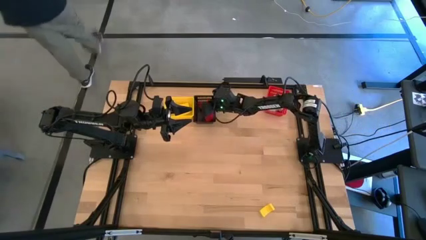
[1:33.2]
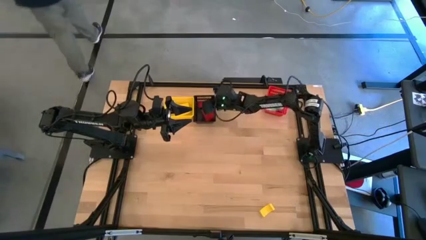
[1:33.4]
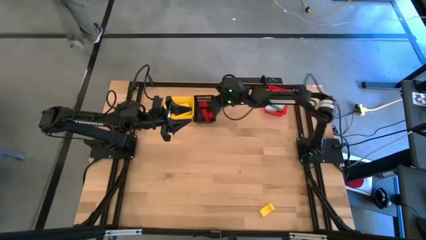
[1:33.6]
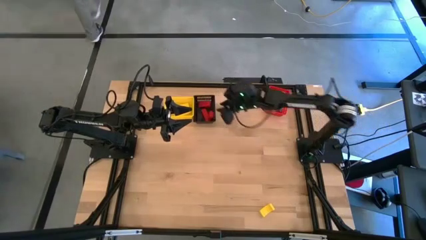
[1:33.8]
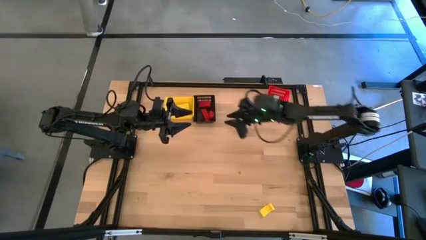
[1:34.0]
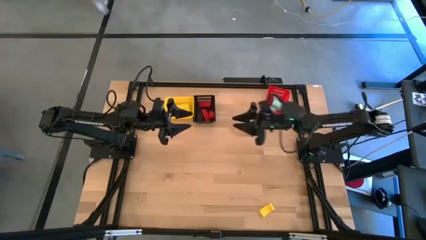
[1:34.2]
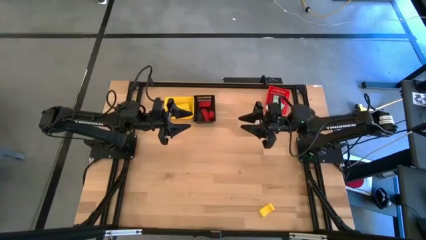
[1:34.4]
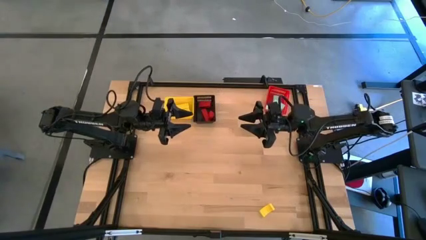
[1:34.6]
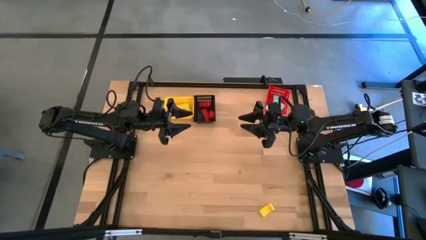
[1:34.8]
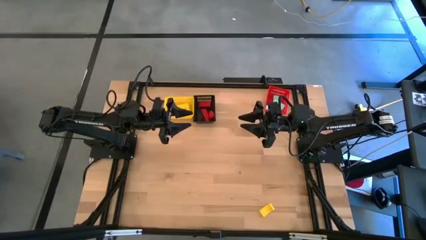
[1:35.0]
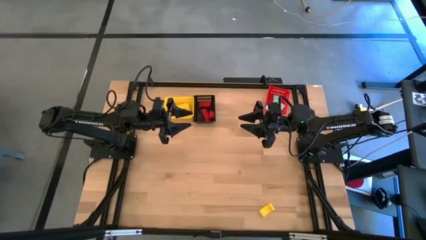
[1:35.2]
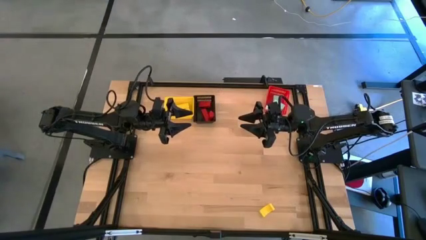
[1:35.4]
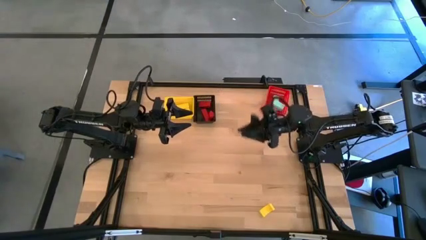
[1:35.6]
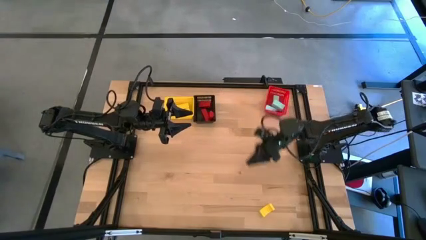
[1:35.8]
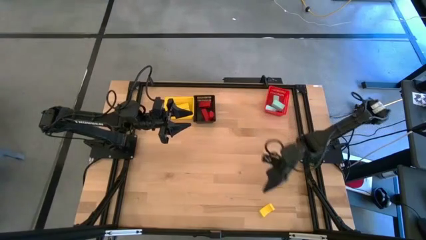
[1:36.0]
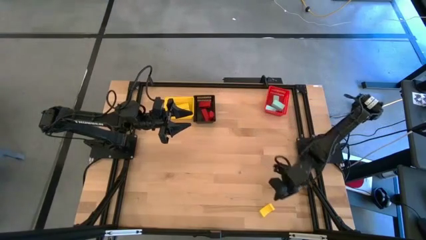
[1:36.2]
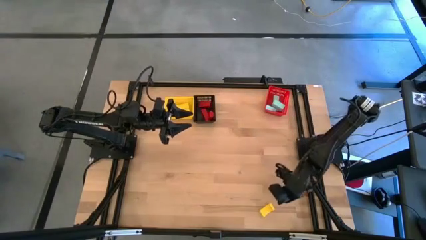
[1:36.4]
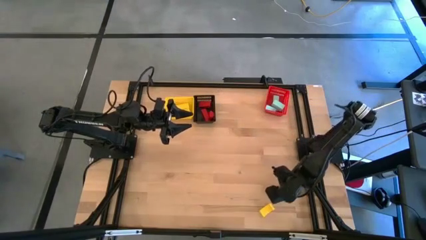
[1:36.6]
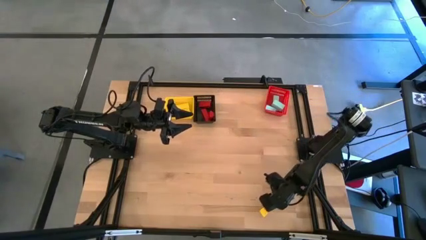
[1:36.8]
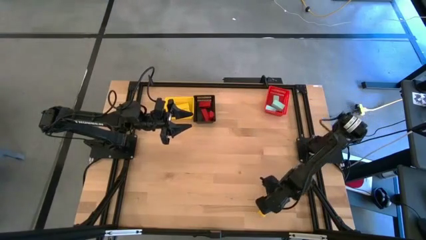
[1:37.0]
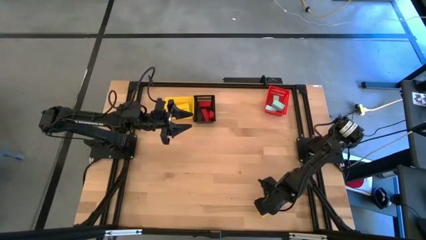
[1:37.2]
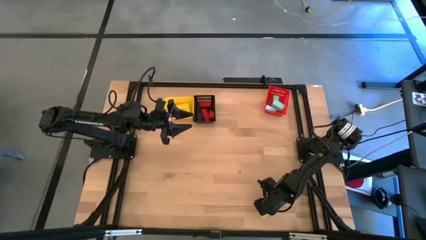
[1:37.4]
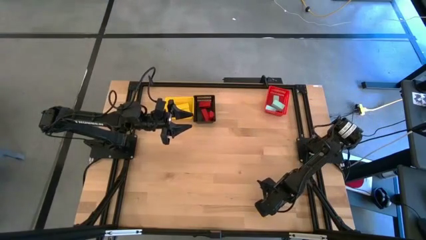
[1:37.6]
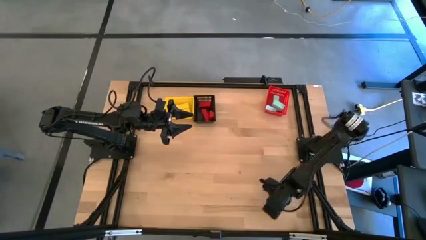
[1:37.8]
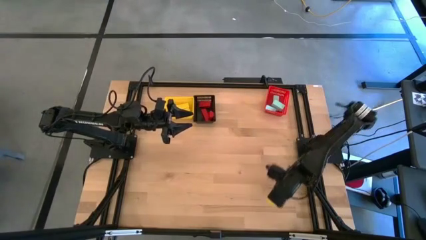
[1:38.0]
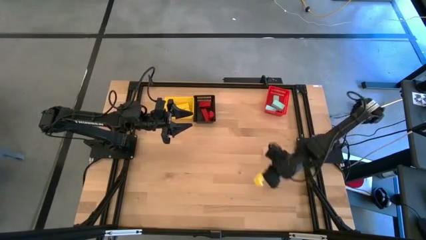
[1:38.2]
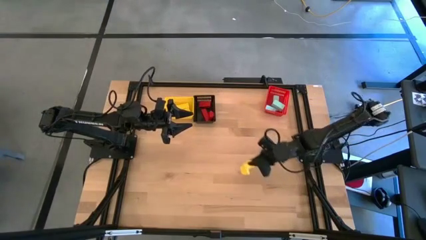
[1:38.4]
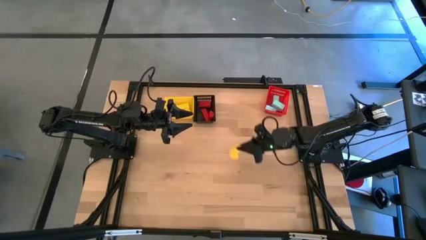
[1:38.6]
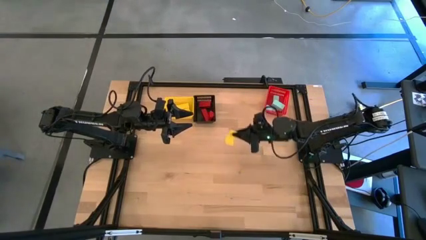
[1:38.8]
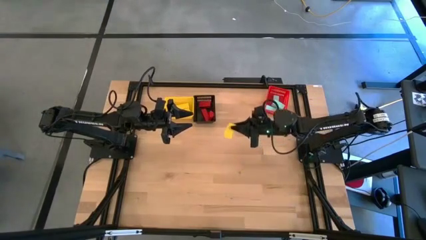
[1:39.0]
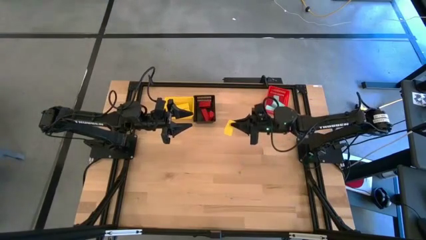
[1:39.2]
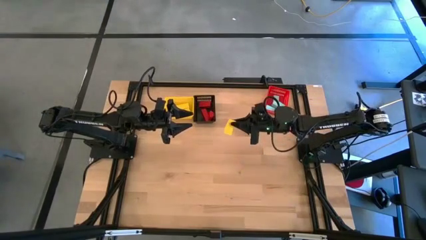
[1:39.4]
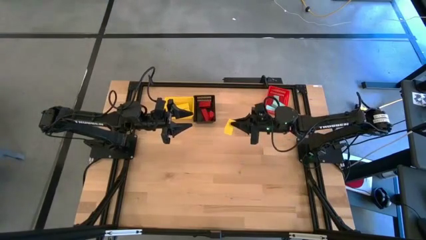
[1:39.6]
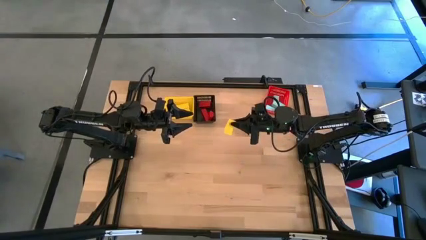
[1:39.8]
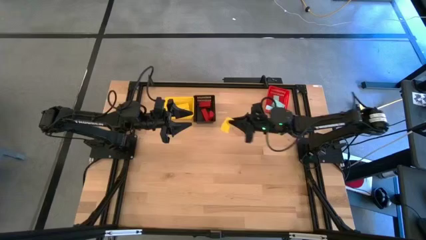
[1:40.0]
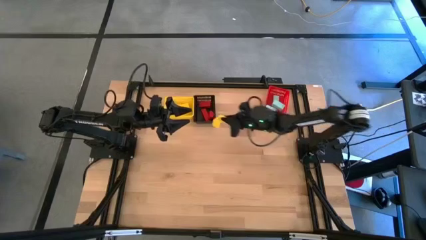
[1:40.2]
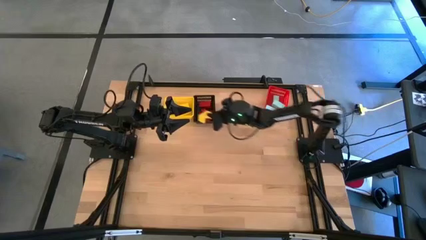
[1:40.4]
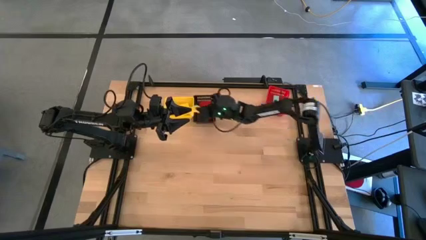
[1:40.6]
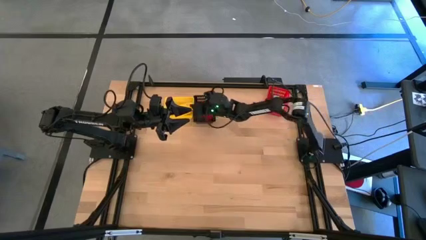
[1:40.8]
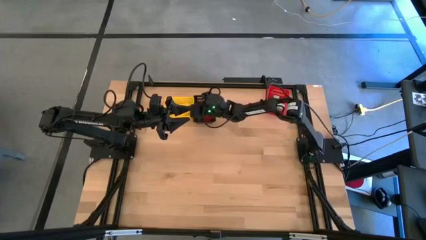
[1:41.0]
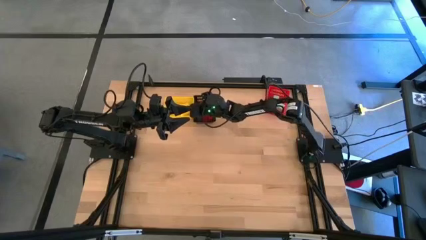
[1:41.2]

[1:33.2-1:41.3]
Task: Sort & place blocks by color
Put the yellow block into the yellow bin

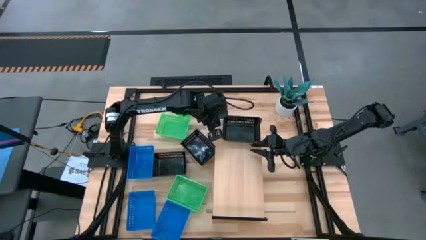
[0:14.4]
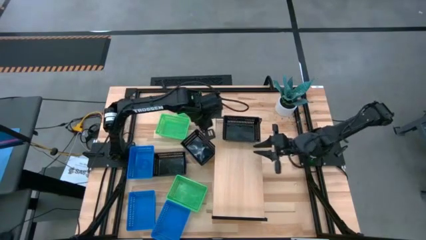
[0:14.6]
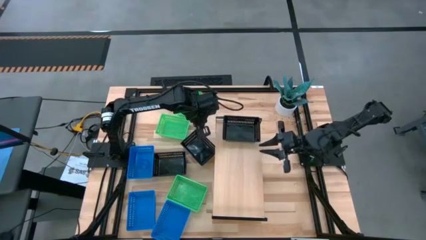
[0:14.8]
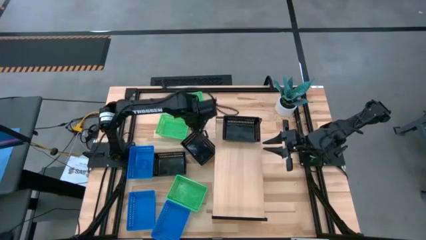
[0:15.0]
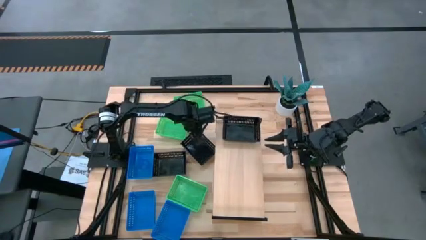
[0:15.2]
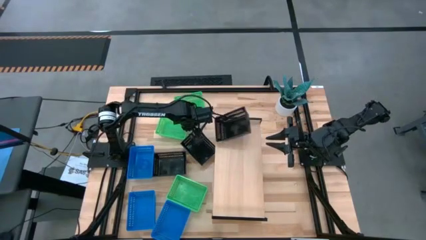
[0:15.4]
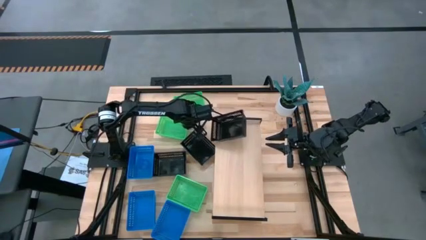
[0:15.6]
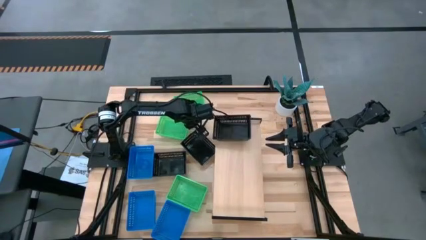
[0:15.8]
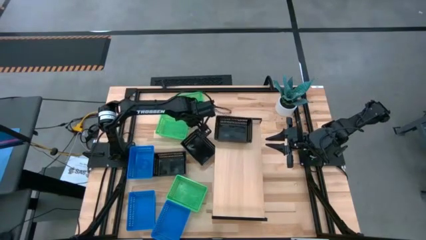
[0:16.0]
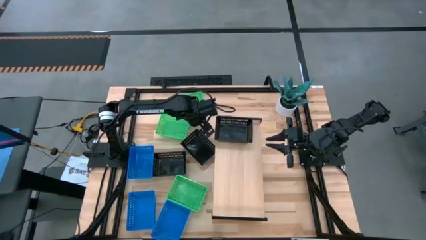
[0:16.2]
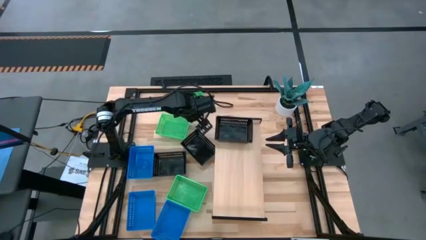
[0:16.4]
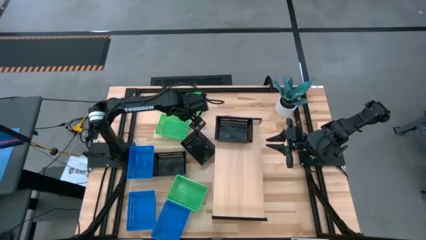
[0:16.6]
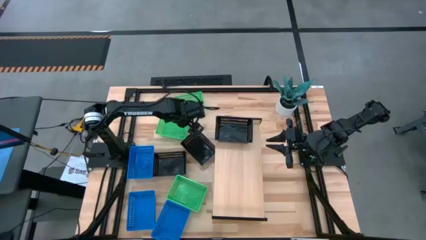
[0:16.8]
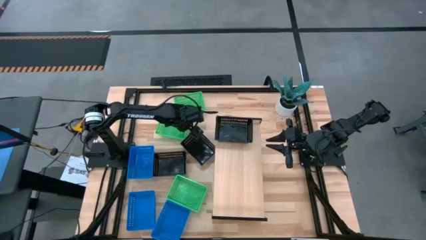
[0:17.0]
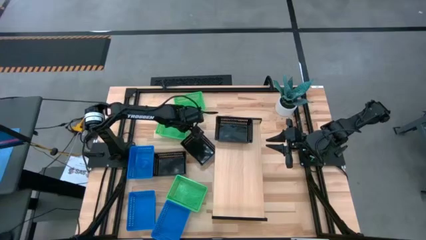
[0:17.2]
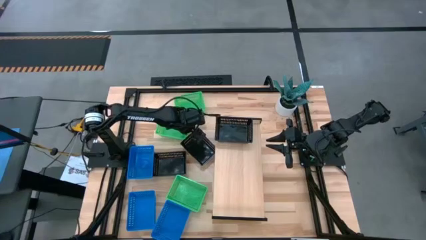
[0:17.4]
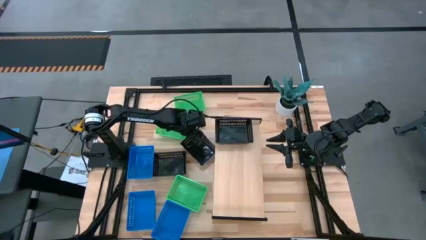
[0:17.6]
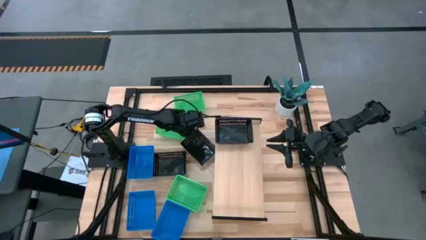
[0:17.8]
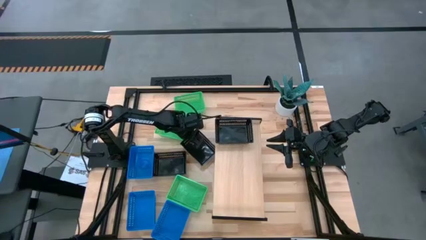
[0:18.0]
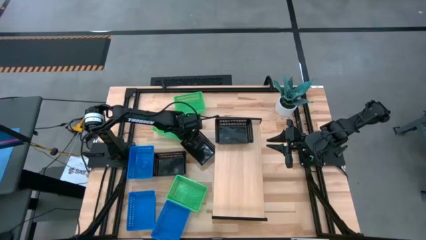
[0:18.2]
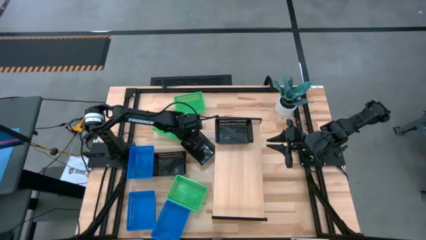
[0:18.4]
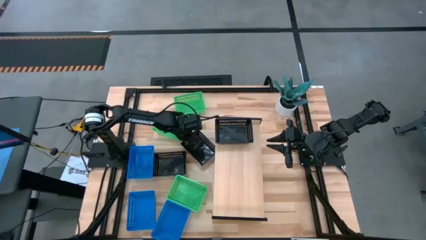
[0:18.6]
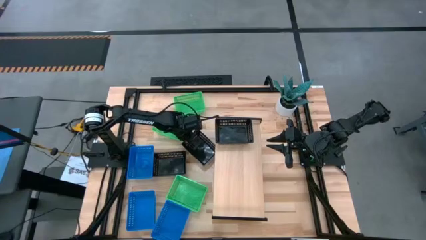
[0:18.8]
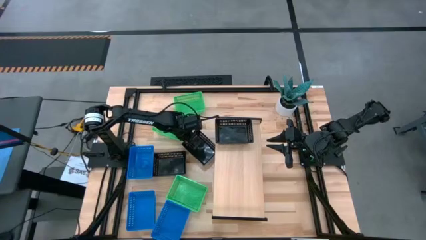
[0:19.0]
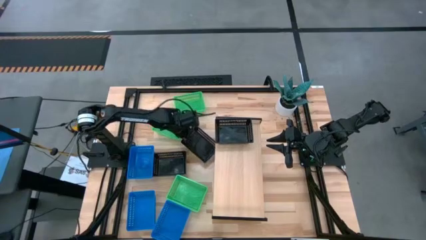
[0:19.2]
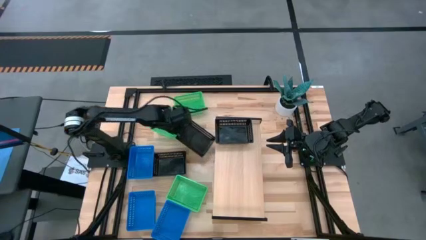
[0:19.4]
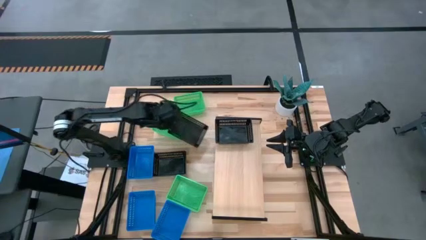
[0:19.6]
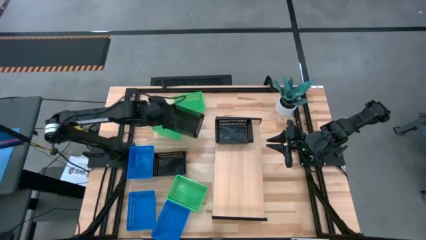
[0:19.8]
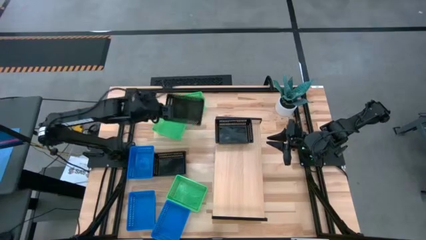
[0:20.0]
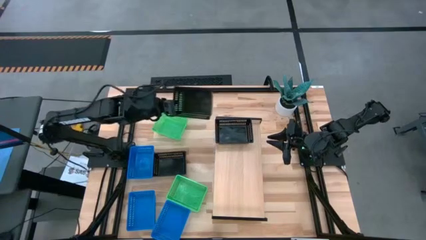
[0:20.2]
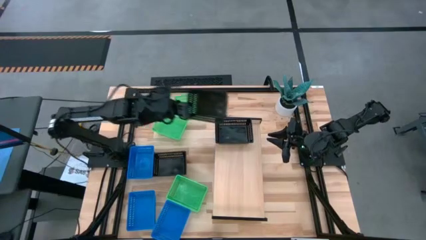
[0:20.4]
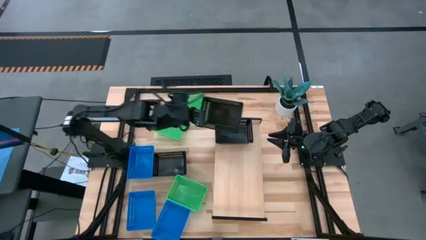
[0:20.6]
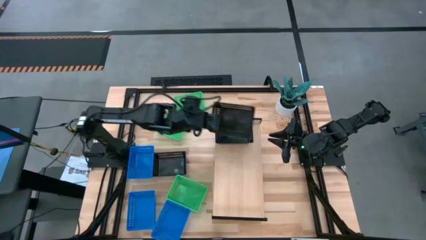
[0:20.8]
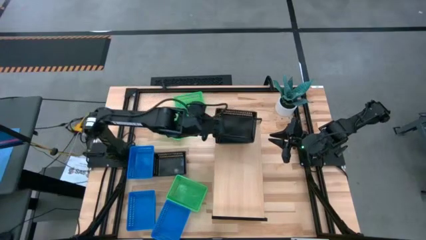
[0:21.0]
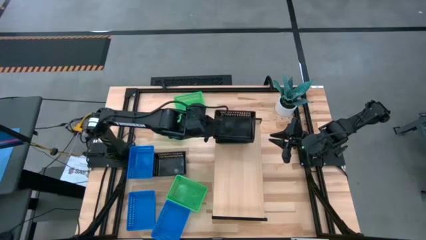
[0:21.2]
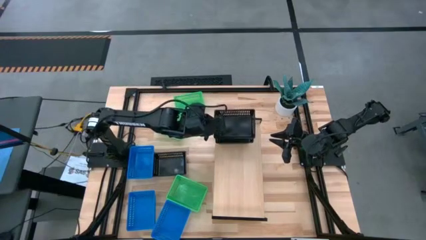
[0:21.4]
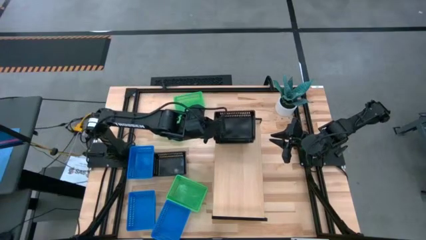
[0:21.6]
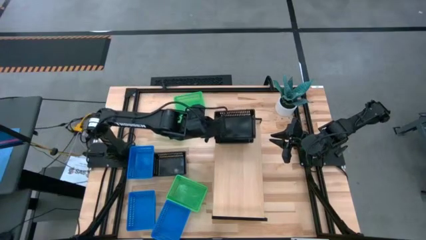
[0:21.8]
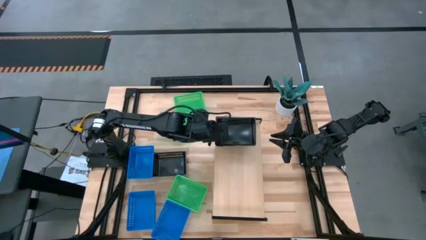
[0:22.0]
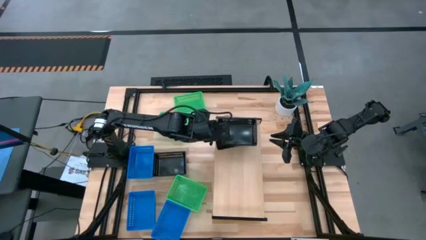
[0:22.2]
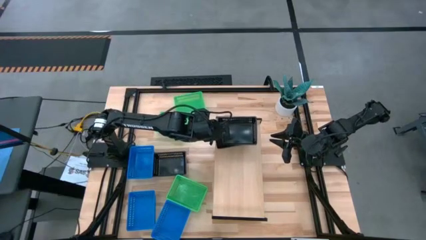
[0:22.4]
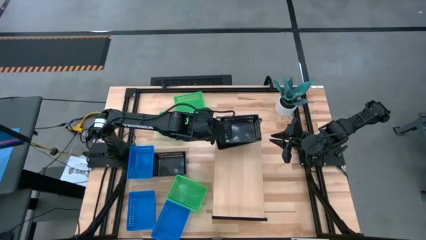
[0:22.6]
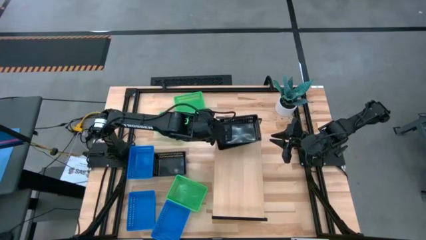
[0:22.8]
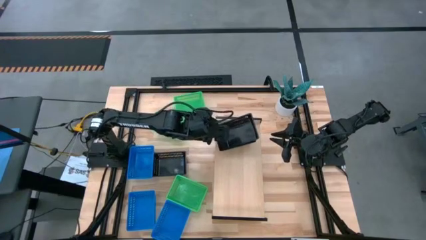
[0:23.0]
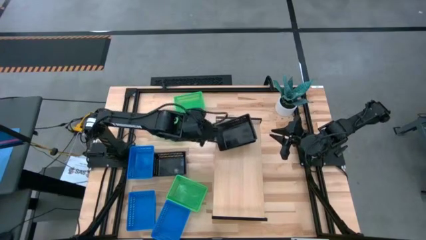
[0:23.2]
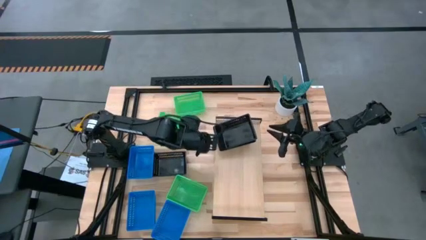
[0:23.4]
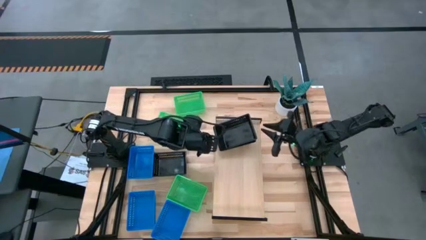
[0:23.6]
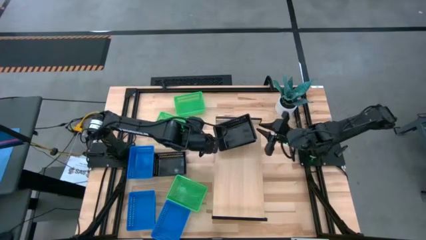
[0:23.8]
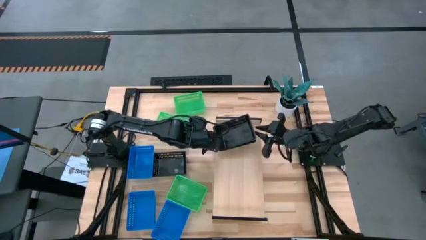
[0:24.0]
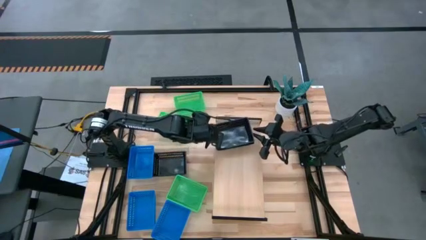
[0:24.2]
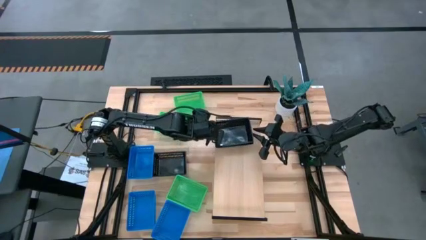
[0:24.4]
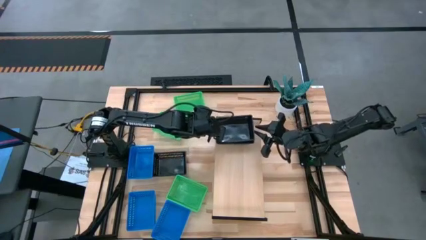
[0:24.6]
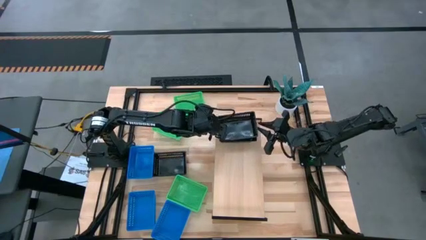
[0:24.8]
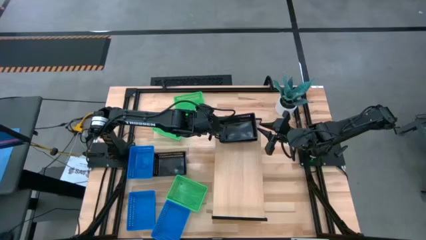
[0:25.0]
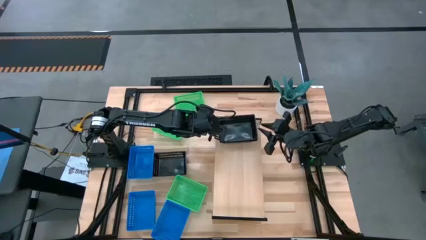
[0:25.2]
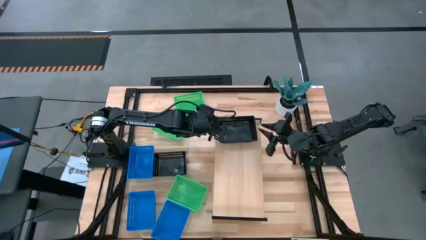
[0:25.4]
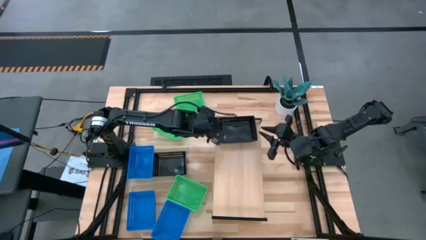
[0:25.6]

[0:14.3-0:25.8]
Task: Stack baskets on shelf by color
Stack the top black bin into the black bin on the shelf
